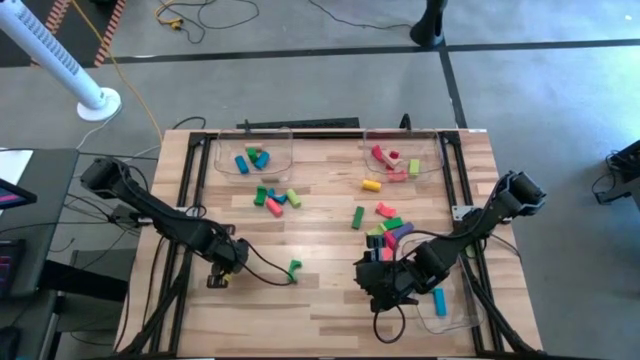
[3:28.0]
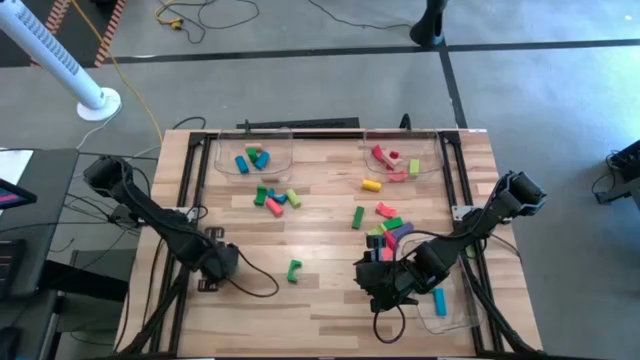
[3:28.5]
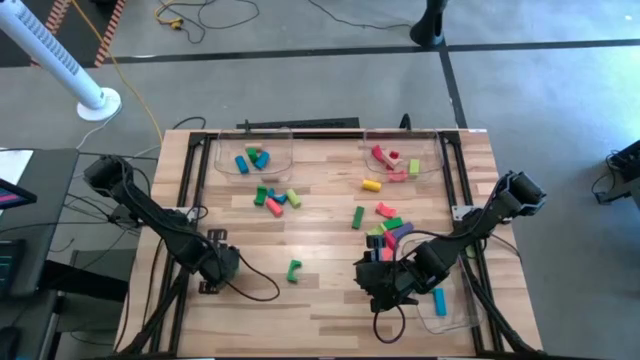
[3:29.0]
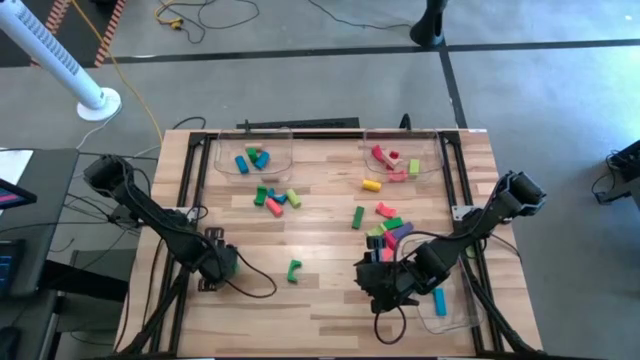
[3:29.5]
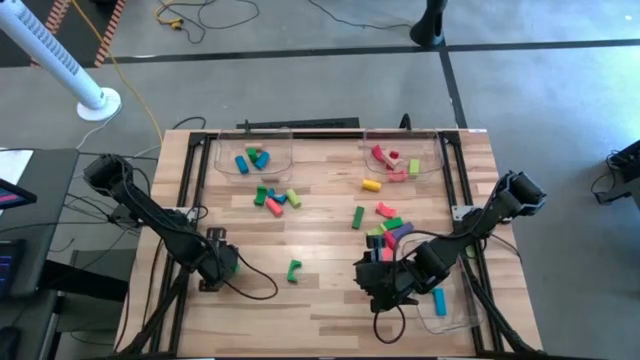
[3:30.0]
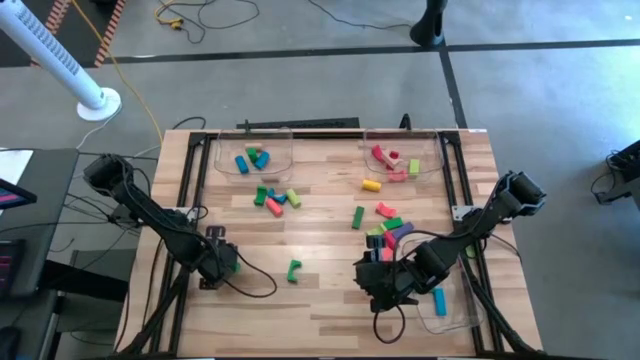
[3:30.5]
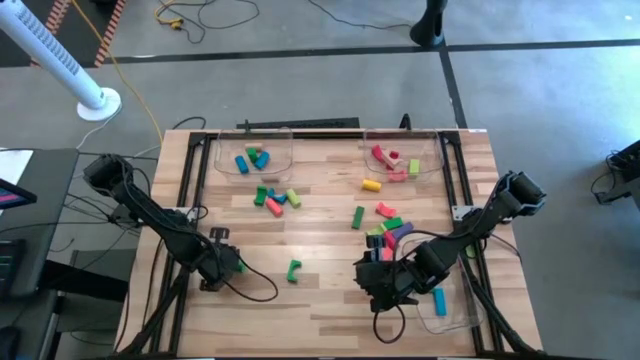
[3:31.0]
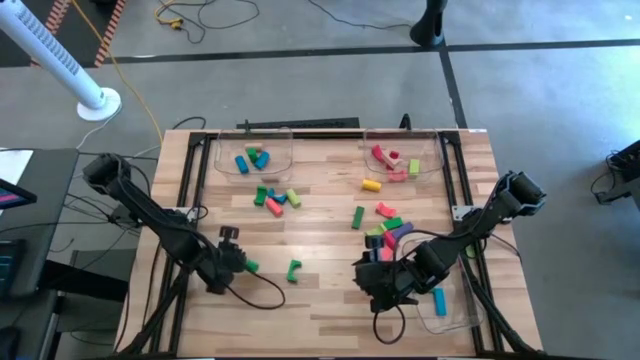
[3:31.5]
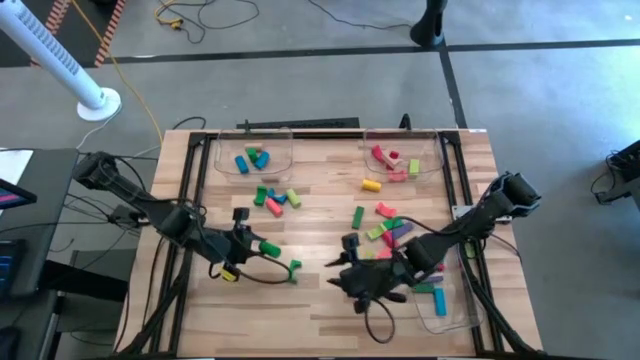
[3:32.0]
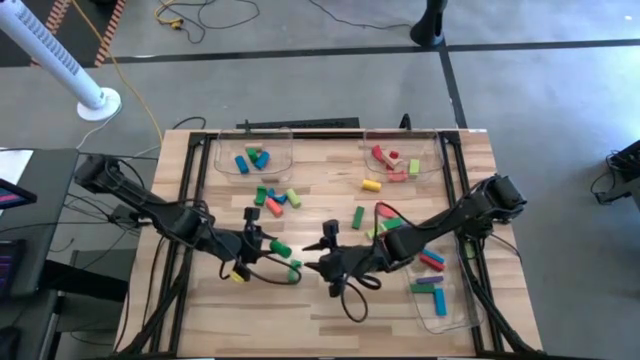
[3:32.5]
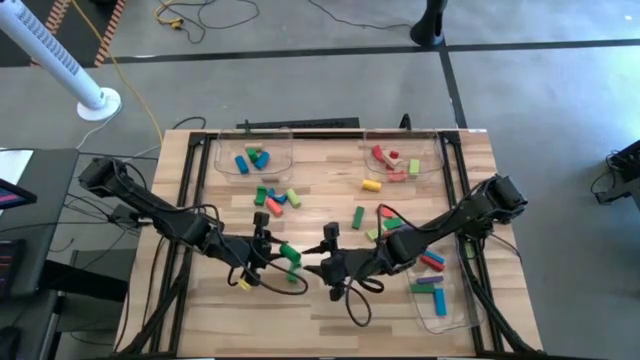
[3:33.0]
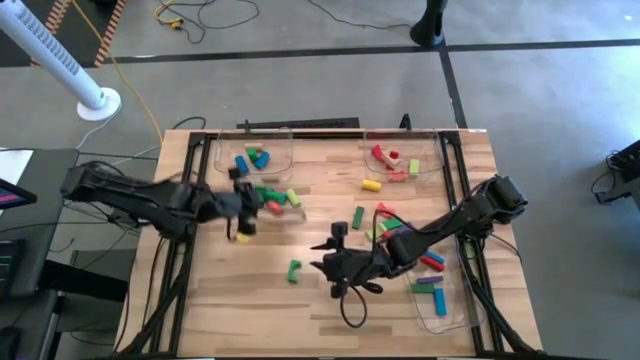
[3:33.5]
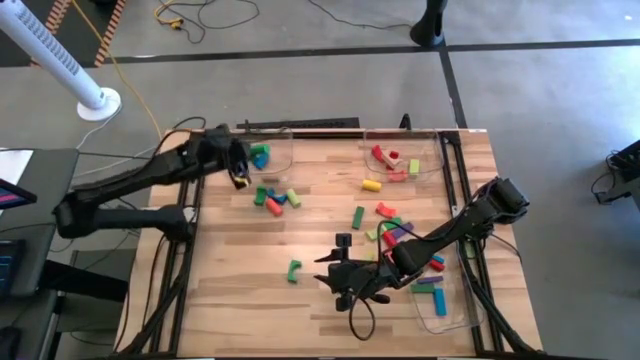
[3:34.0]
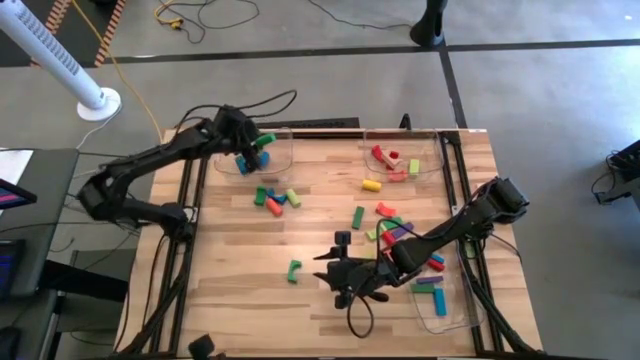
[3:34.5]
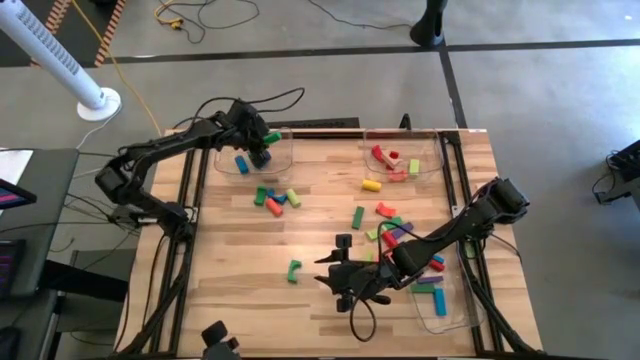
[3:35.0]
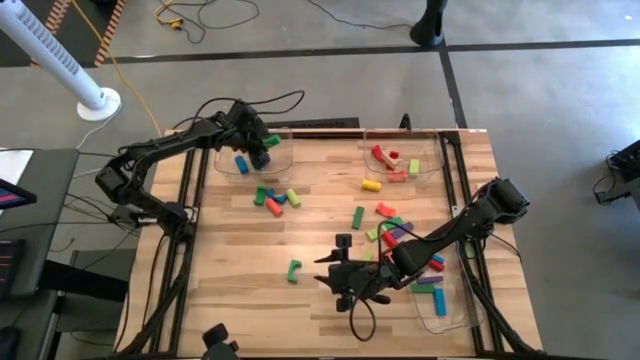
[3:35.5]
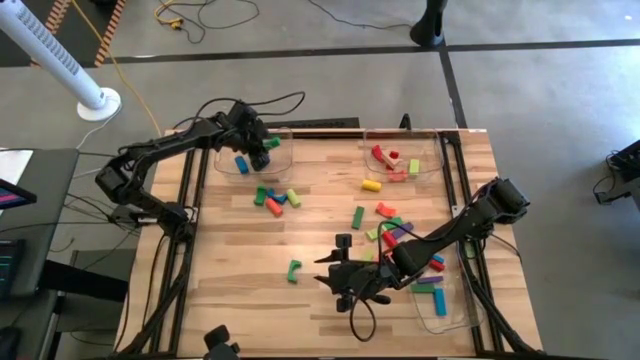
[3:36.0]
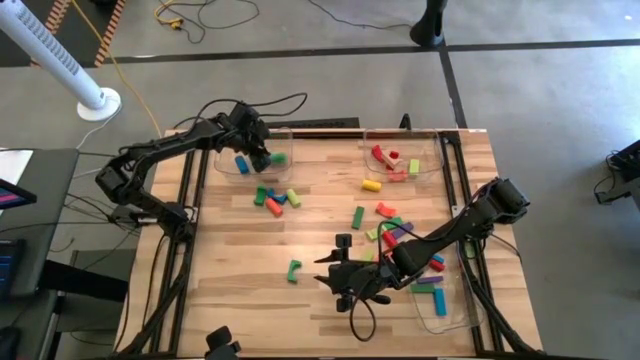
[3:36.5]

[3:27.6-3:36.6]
Task: Sort blocks by size
Put the green cylindrical block into the top left transparent bin

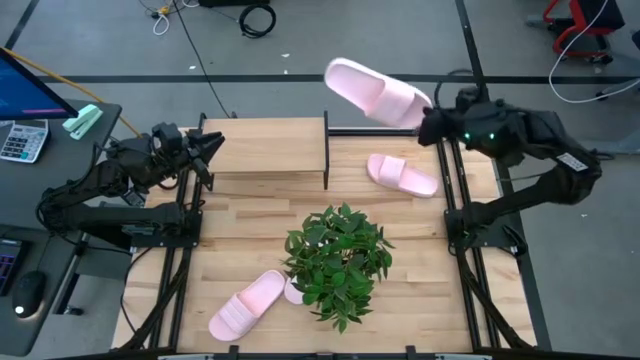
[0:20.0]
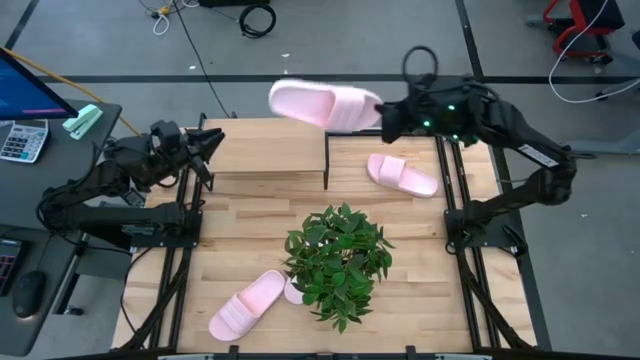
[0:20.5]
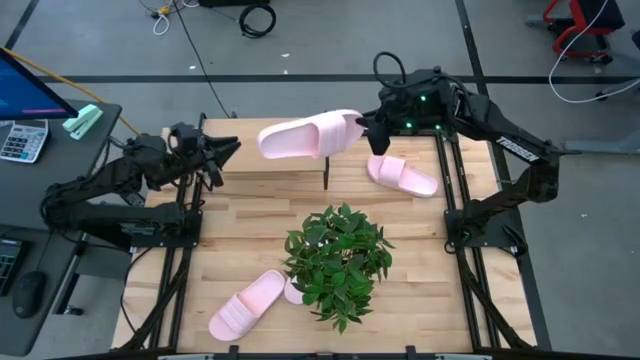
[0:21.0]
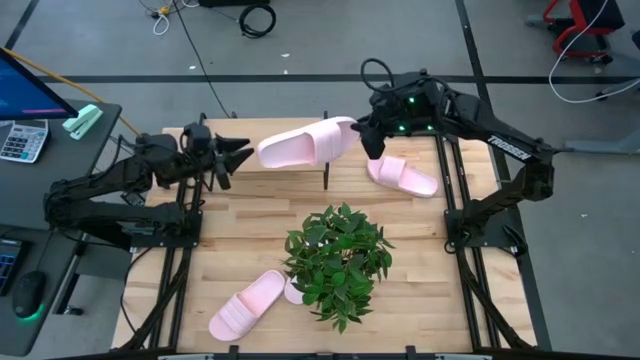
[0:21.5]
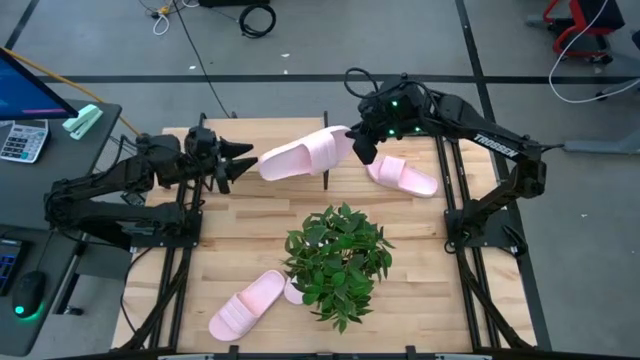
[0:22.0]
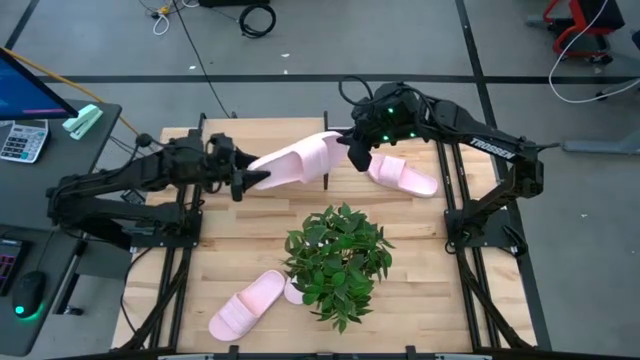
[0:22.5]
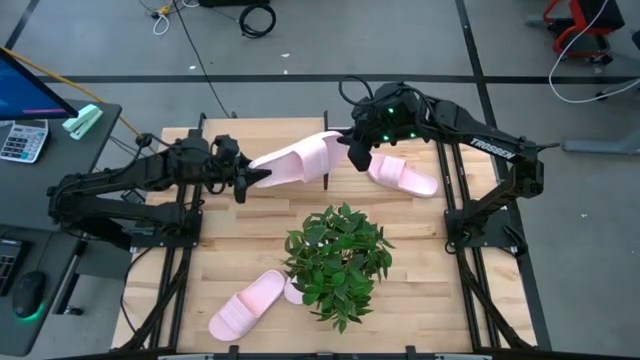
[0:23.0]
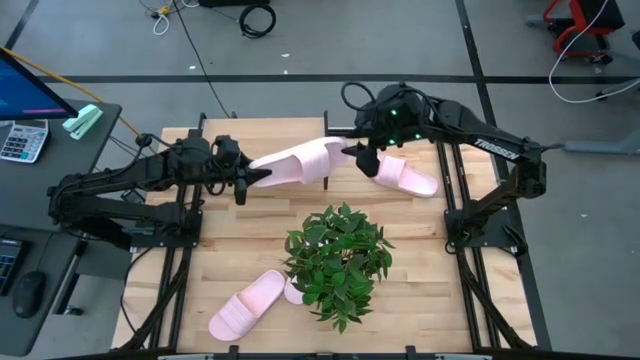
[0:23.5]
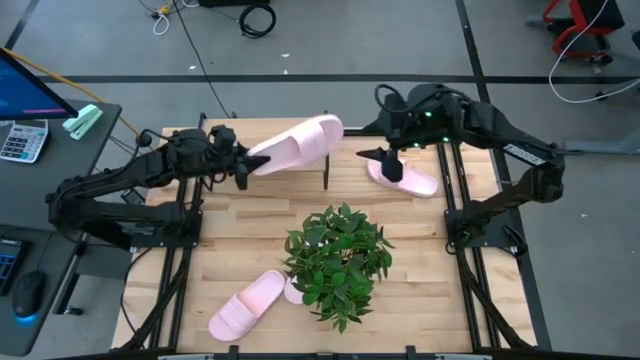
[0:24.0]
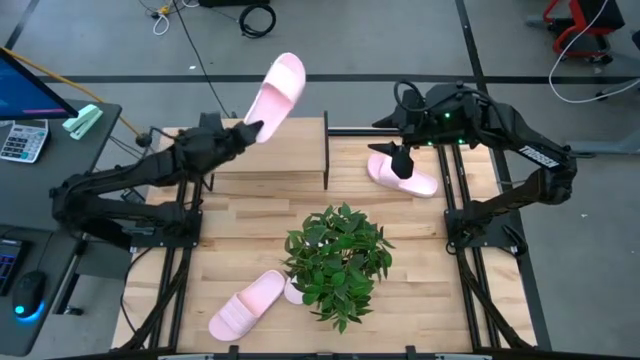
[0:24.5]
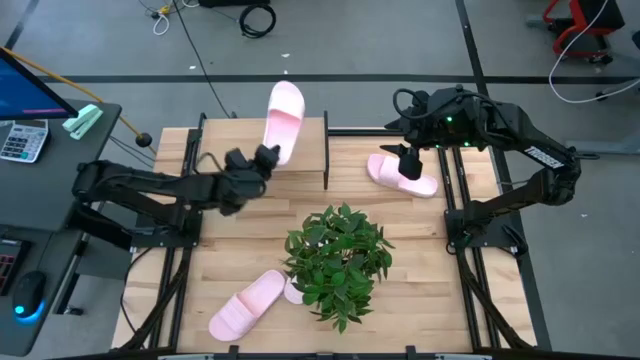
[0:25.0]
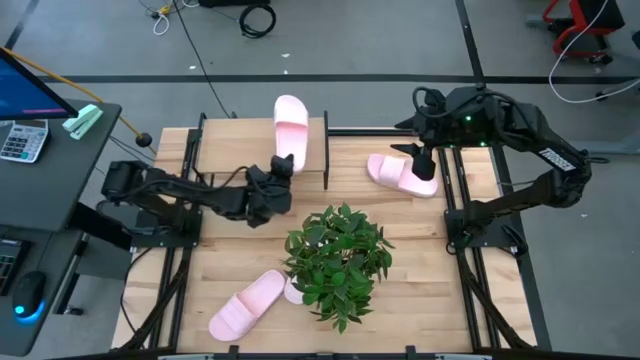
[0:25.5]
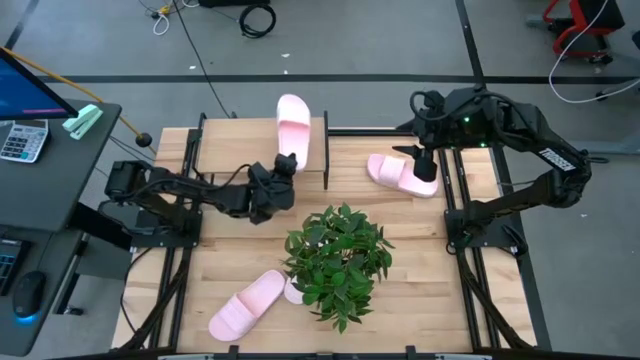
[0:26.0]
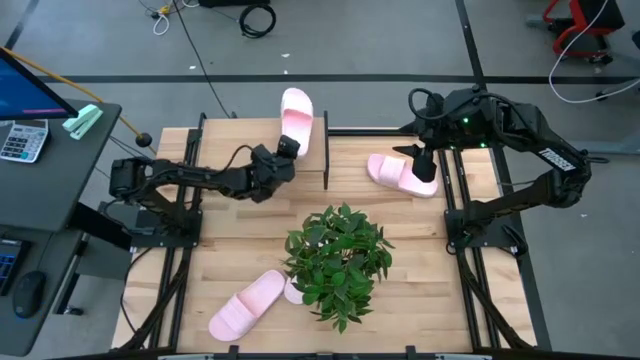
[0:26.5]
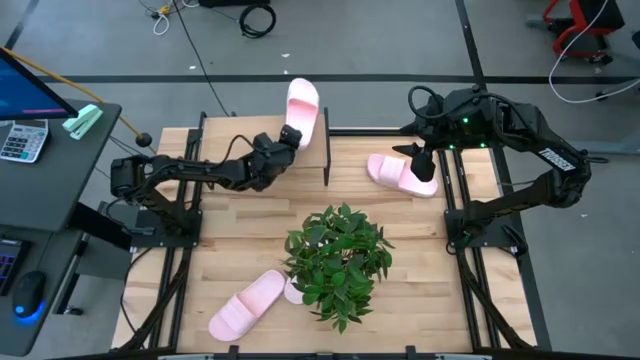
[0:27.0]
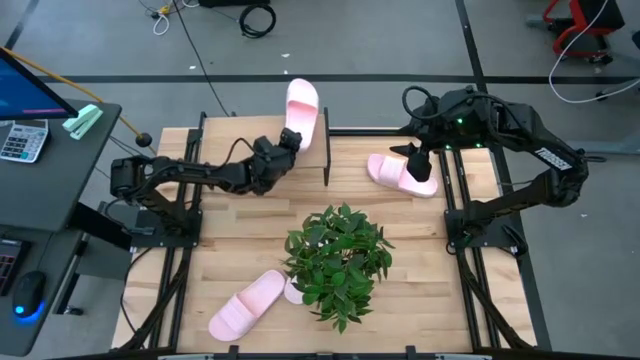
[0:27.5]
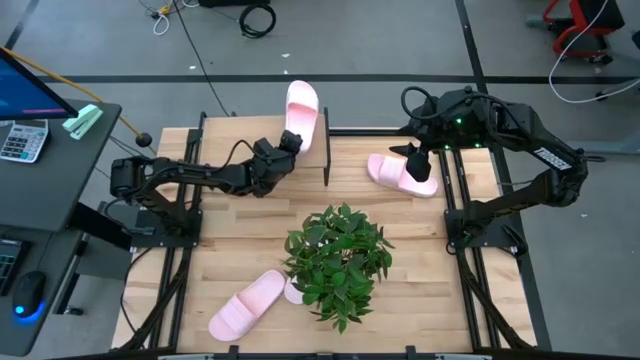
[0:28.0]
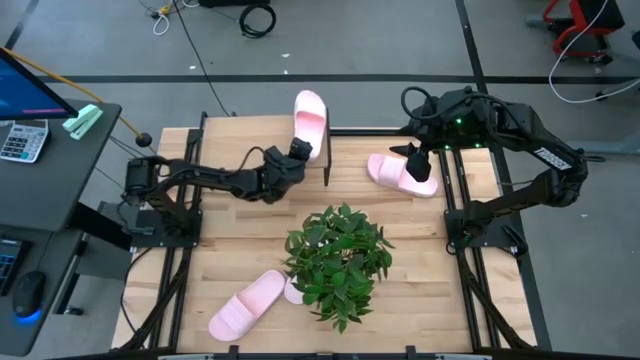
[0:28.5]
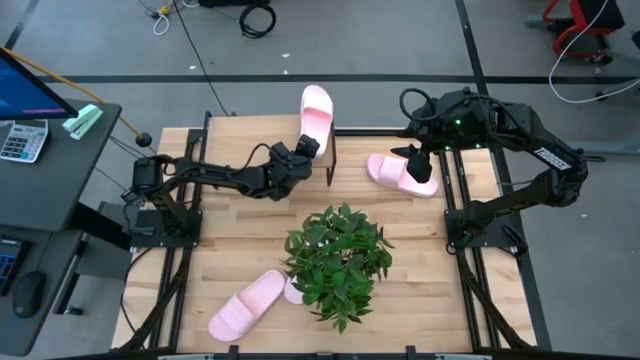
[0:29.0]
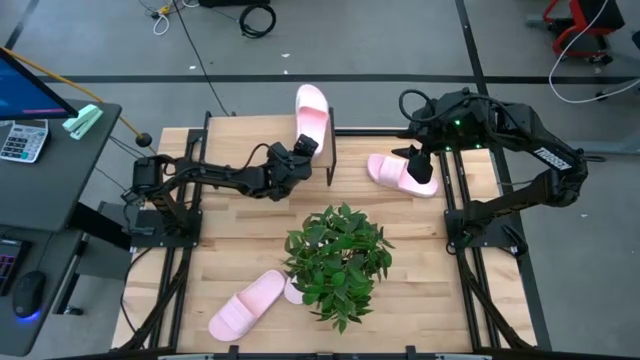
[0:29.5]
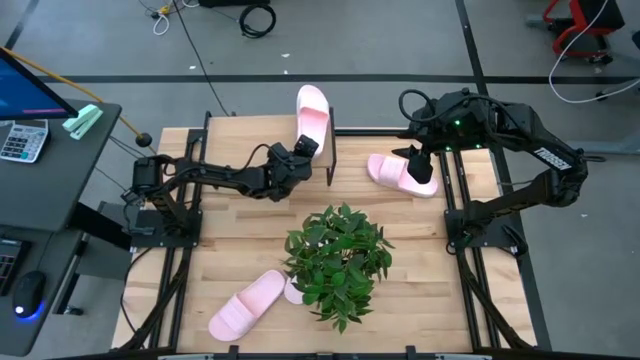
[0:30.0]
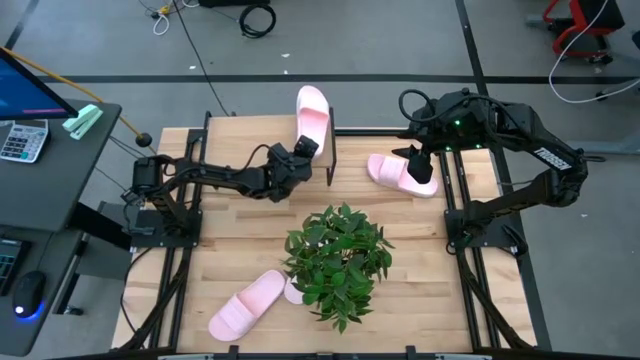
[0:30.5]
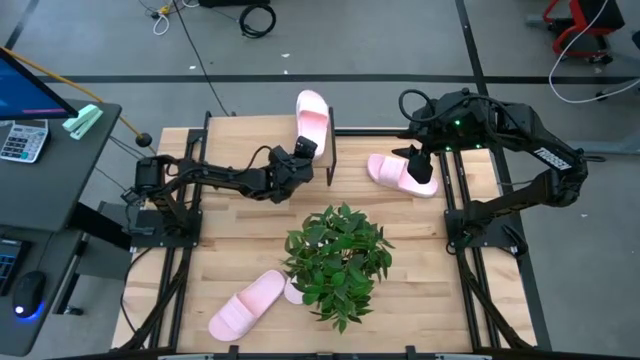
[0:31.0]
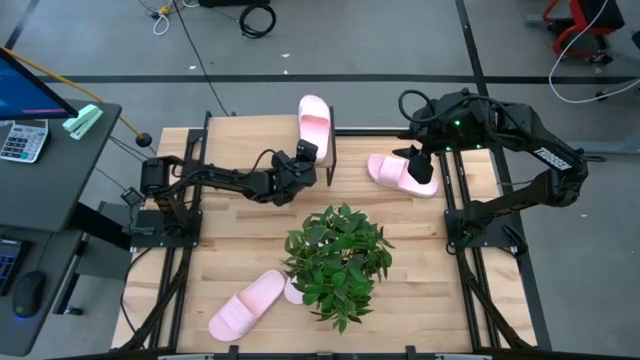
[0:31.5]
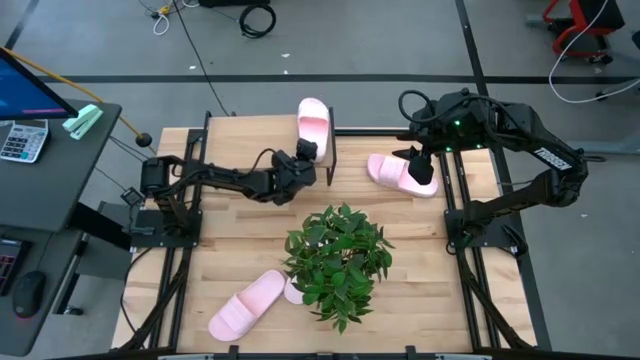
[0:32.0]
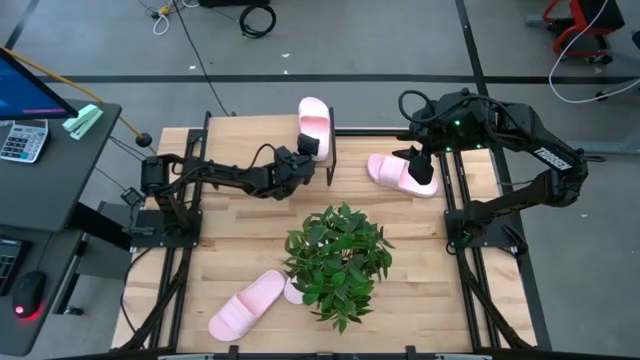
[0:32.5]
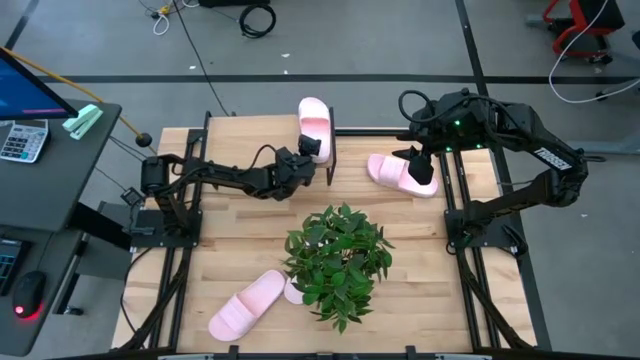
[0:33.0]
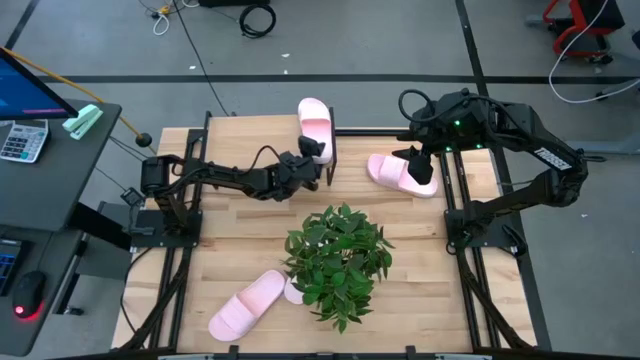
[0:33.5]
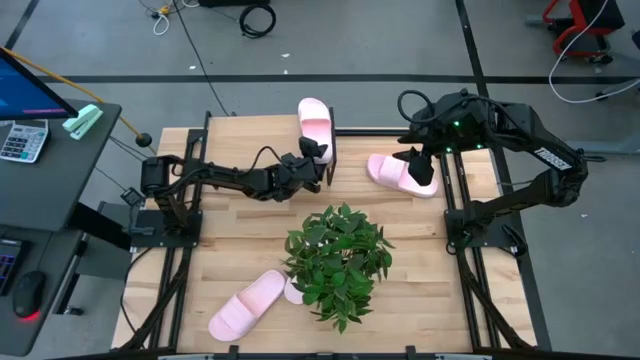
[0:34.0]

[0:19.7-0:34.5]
Task: Pick and place slides into the shelf
Put the pink slide on the shelf
